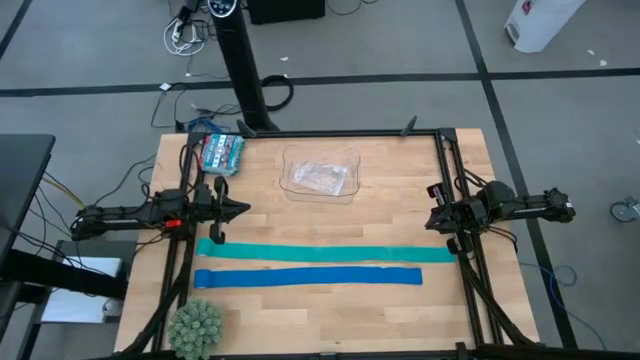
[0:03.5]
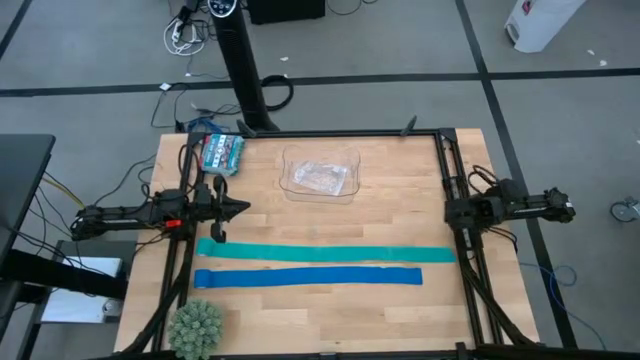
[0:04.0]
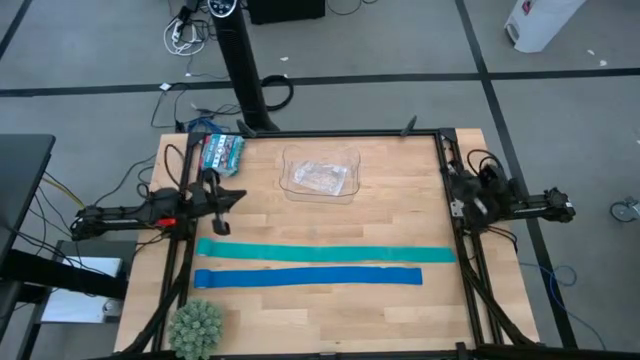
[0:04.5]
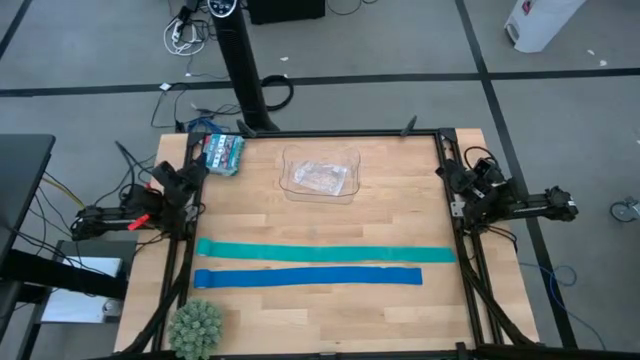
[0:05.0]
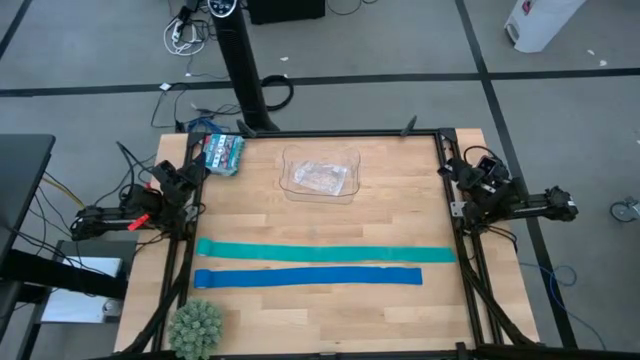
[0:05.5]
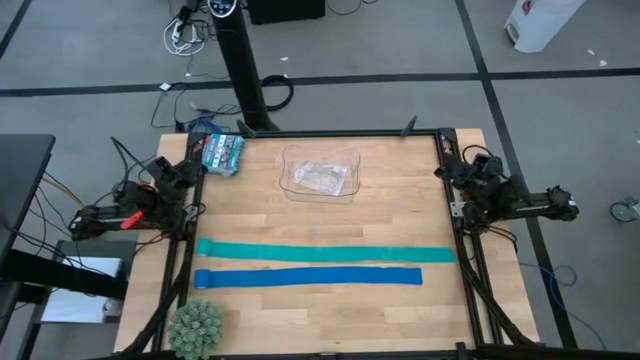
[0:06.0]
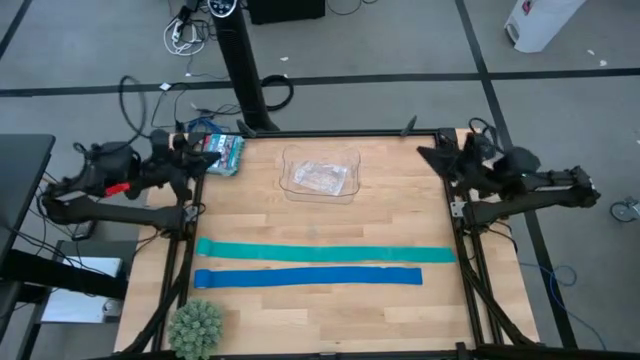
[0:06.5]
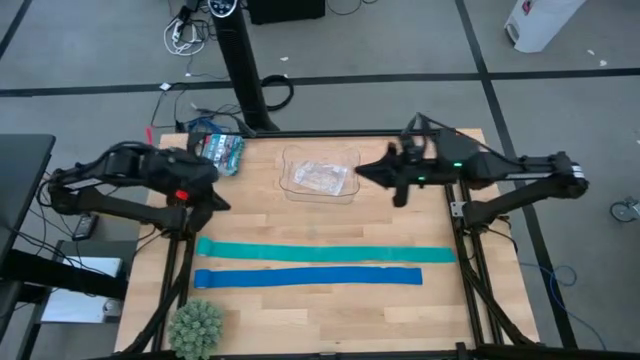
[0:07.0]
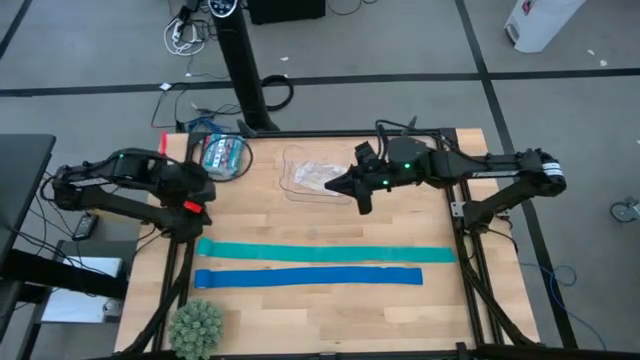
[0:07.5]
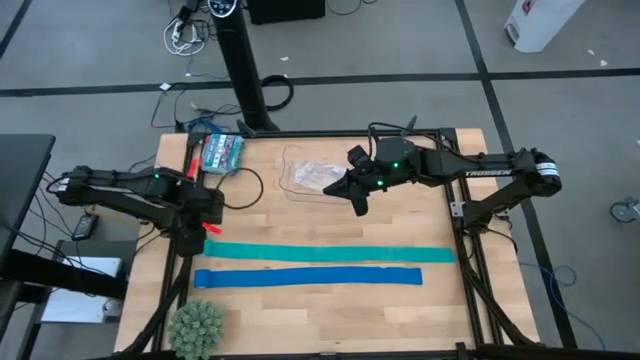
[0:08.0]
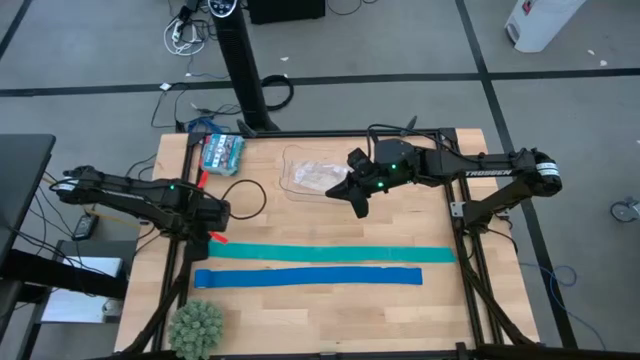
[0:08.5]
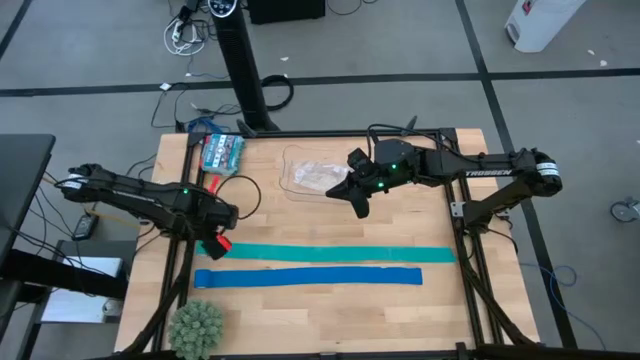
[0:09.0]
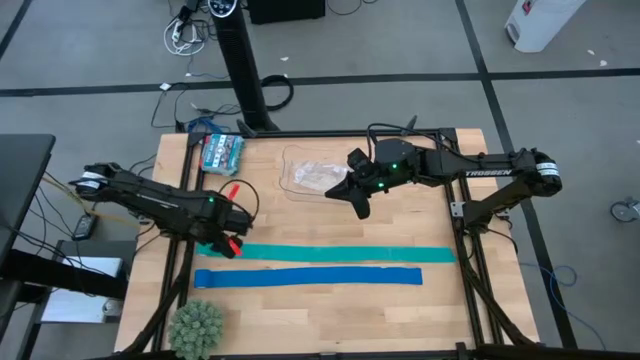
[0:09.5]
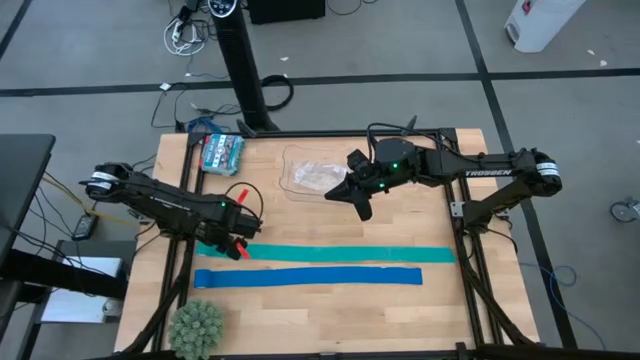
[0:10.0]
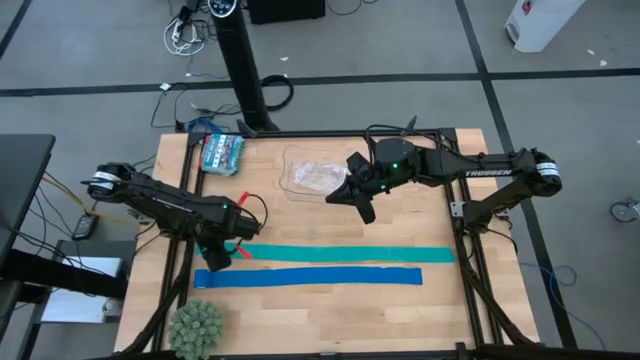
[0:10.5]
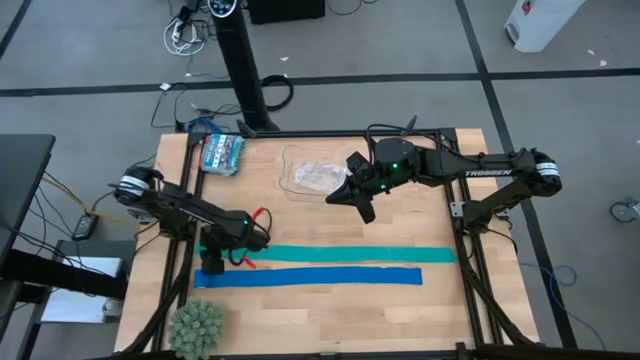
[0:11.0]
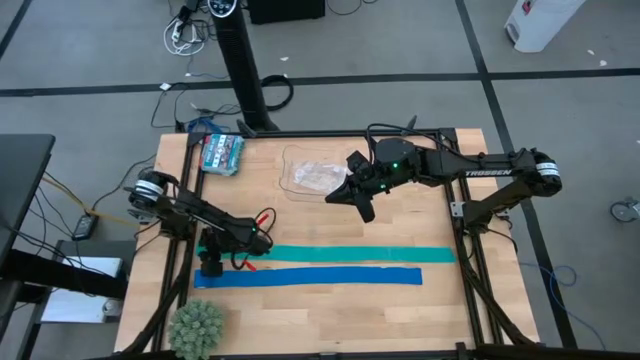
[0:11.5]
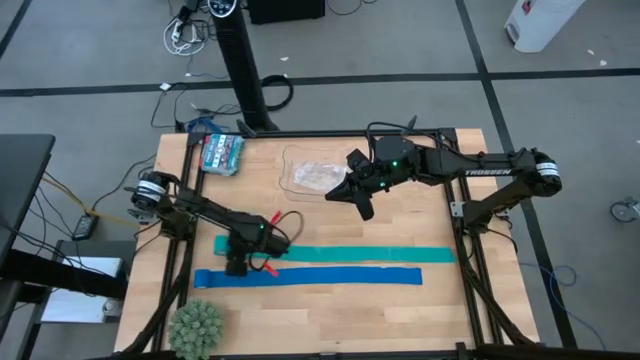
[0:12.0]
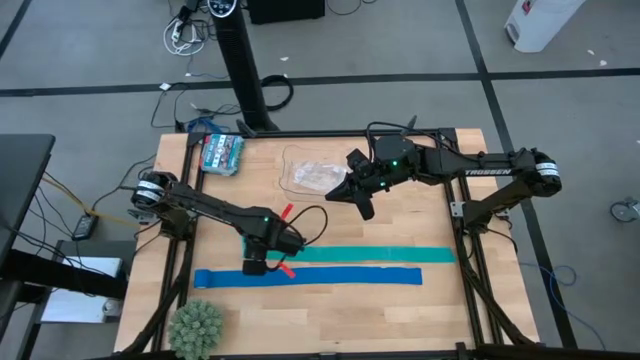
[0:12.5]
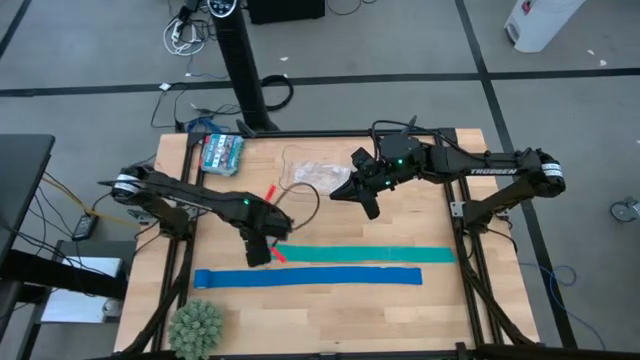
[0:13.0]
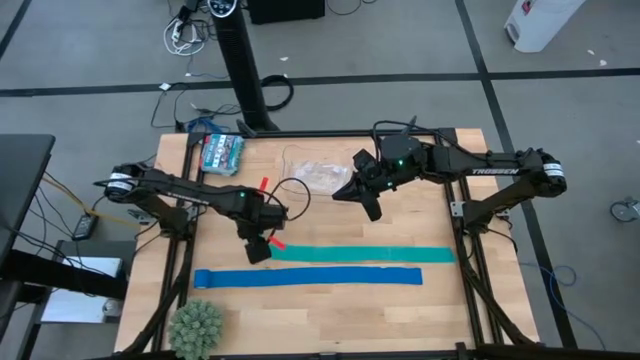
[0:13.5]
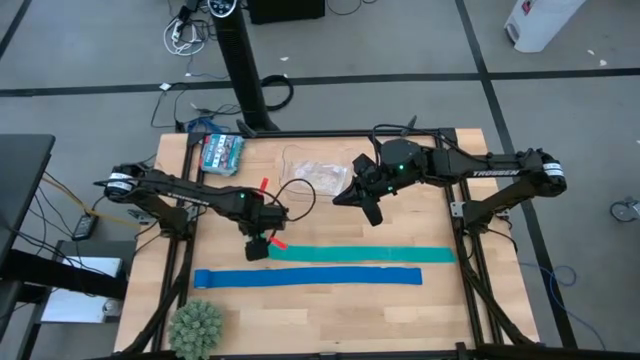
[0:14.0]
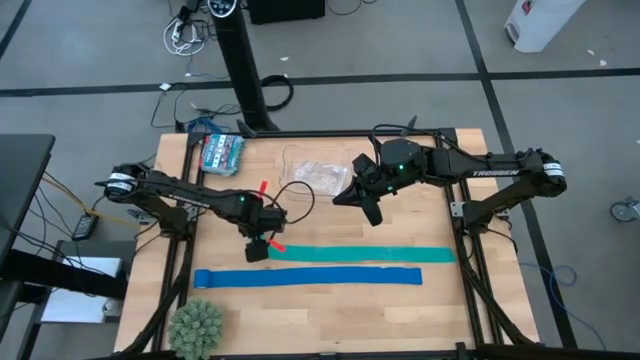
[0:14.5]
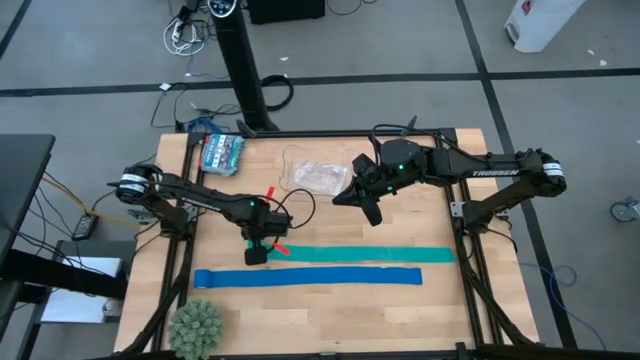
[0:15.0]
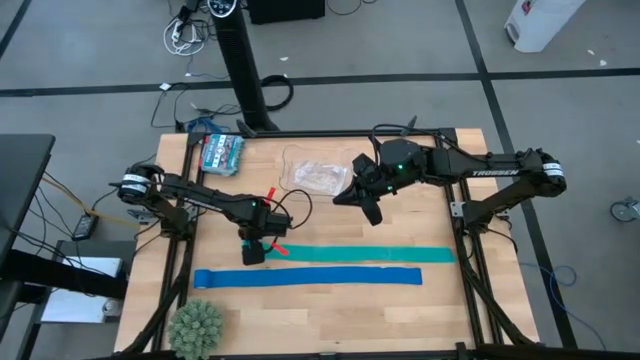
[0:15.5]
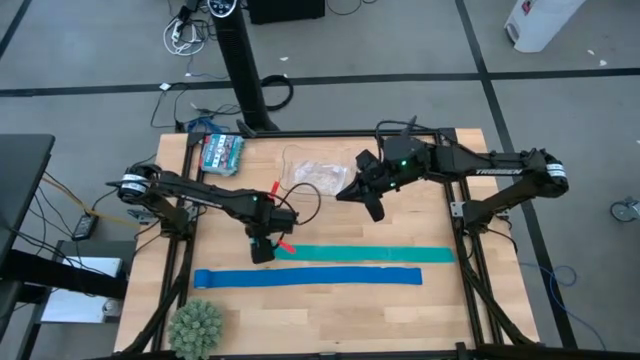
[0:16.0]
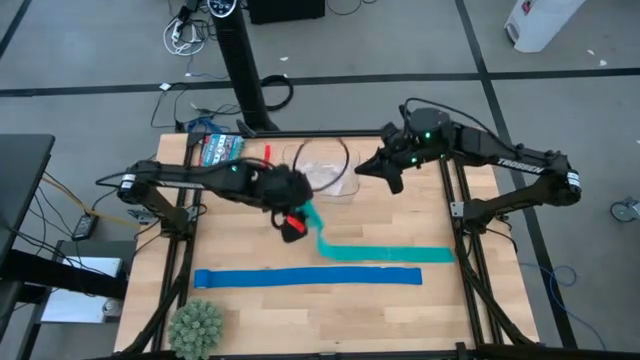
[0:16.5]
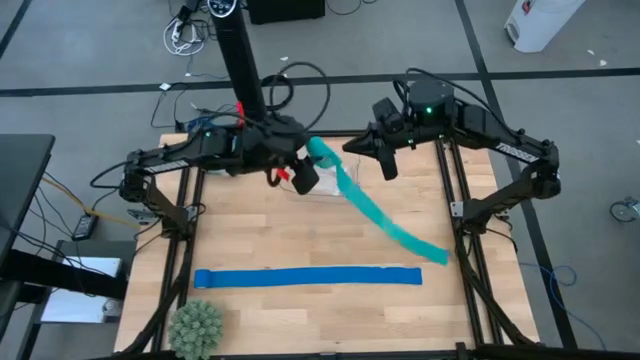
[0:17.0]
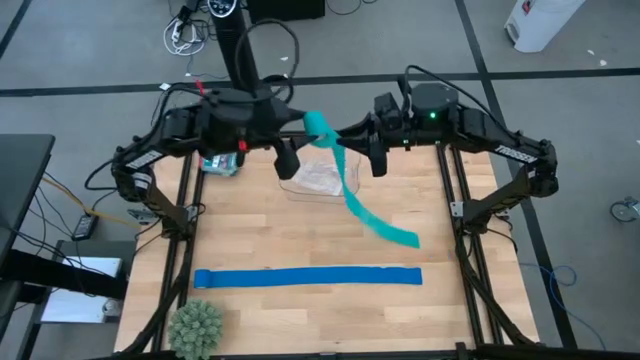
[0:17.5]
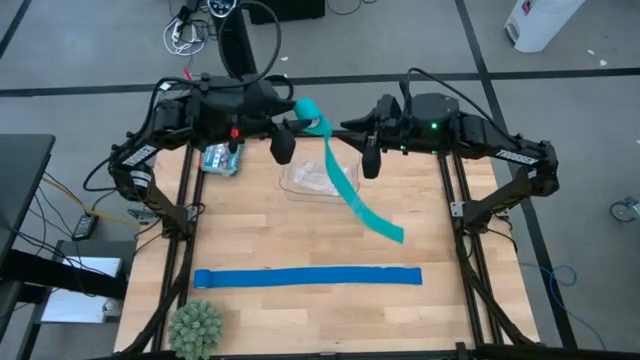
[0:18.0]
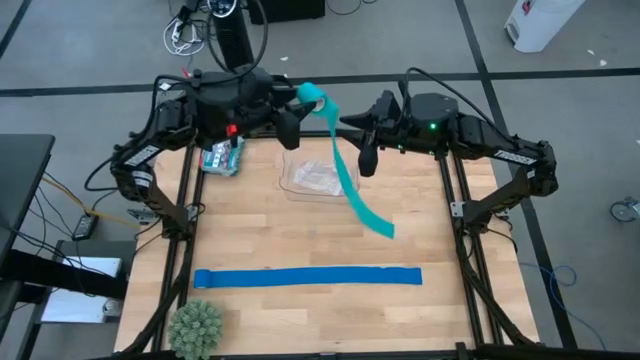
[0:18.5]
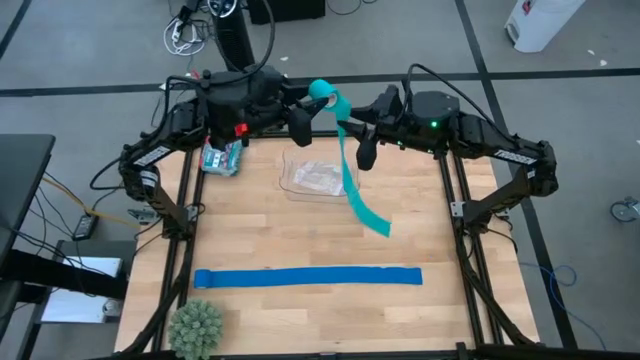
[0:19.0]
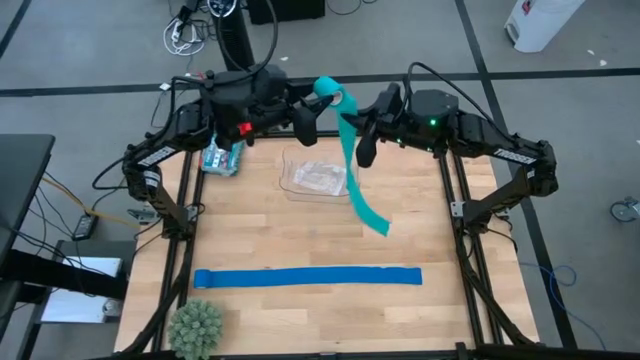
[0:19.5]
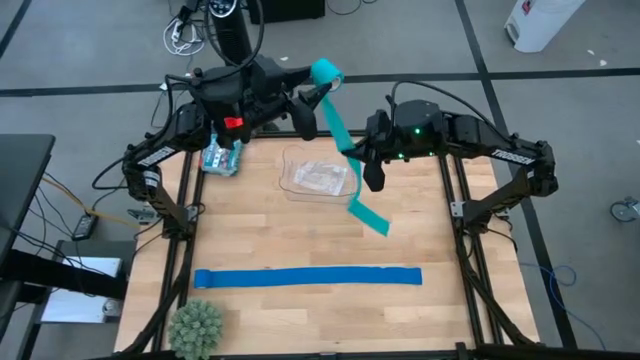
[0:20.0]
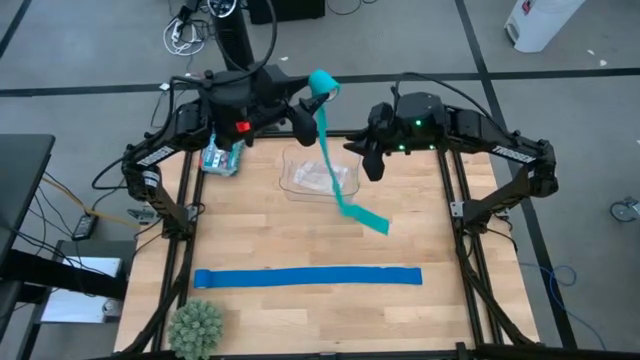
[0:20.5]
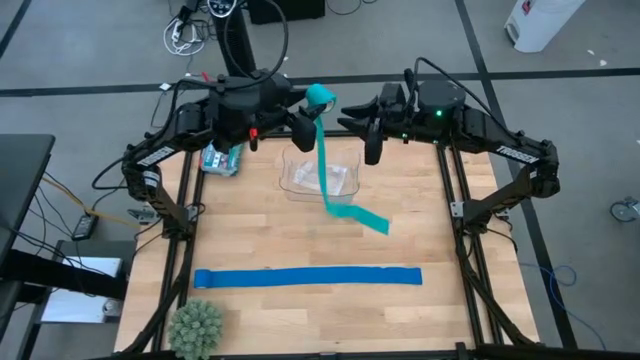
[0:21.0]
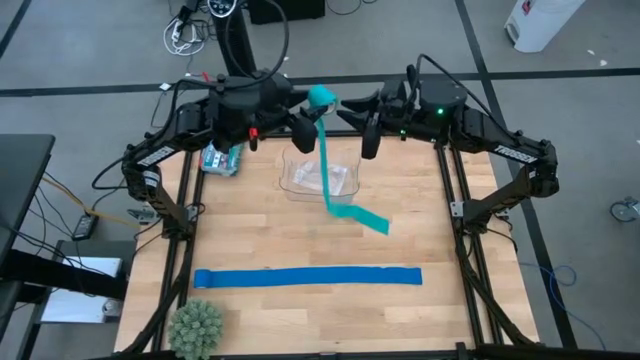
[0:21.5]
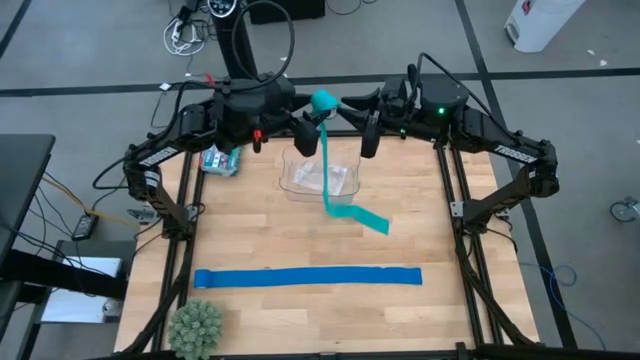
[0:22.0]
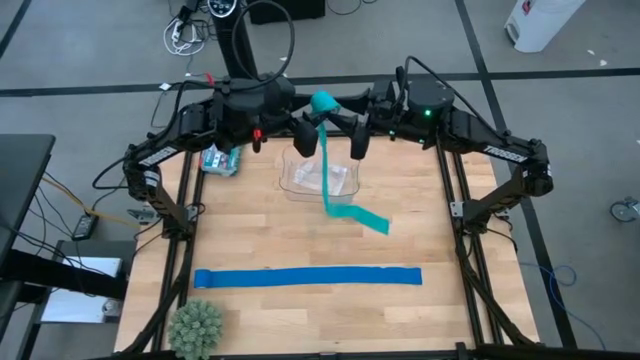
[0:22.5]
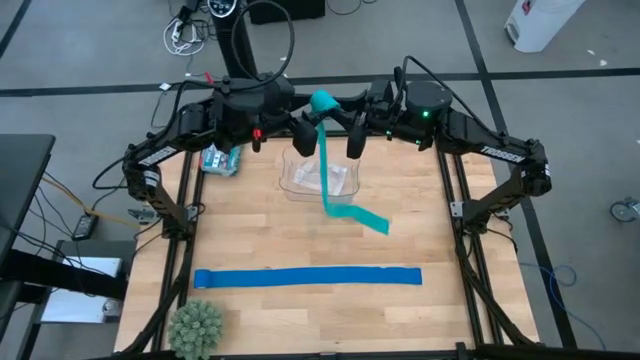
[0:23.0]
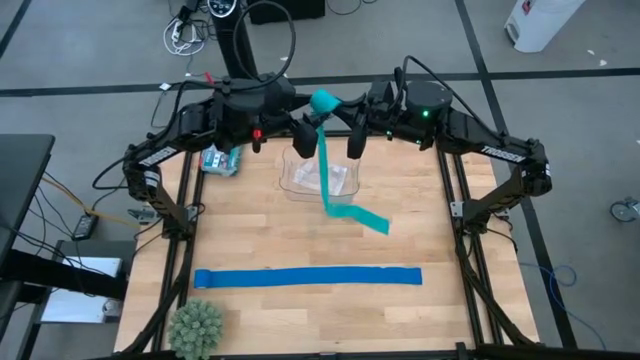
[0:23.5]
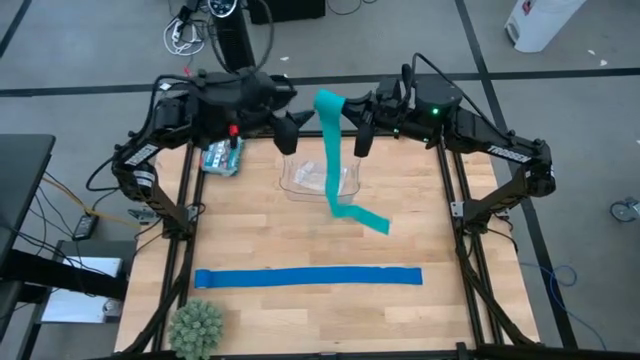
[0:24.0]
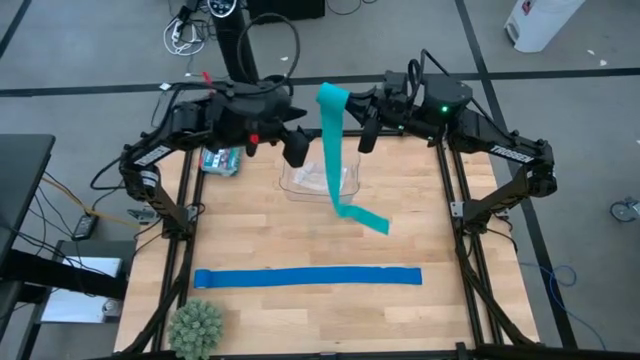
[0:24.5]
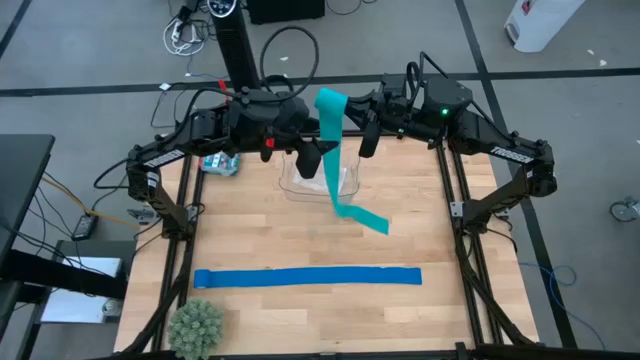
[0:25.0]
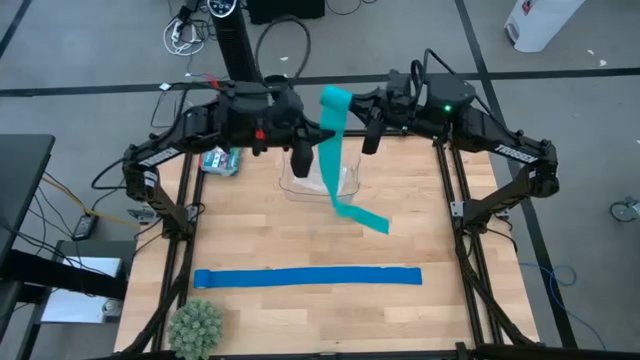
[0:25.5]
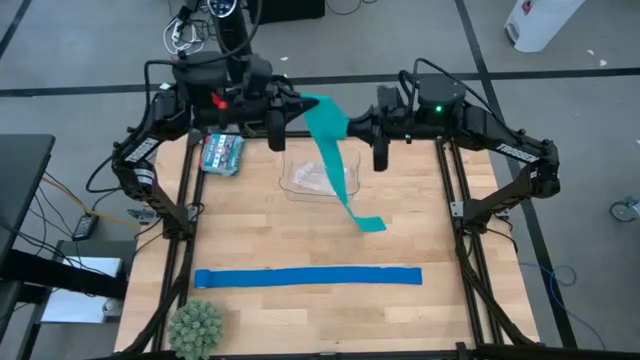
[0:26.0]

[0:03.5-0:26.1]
Task: Roll bandage
Roll the green bandage
